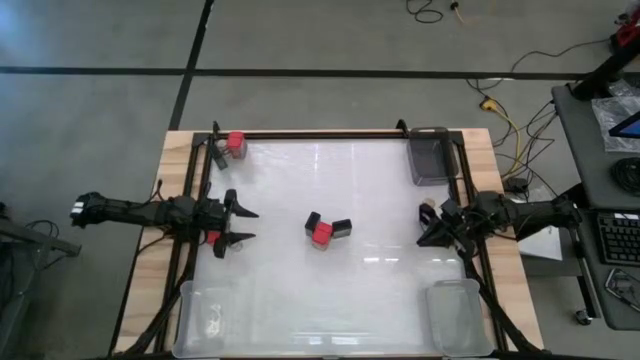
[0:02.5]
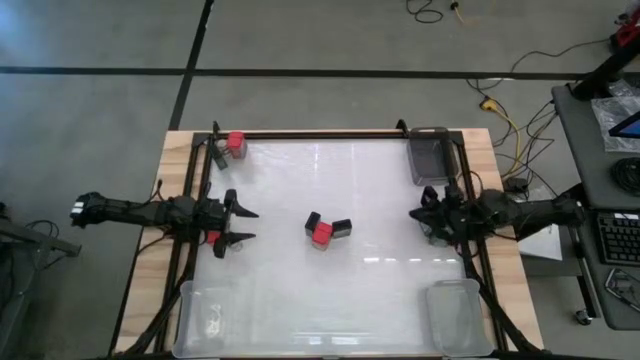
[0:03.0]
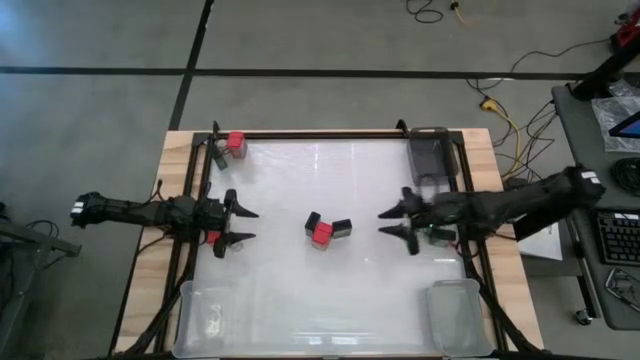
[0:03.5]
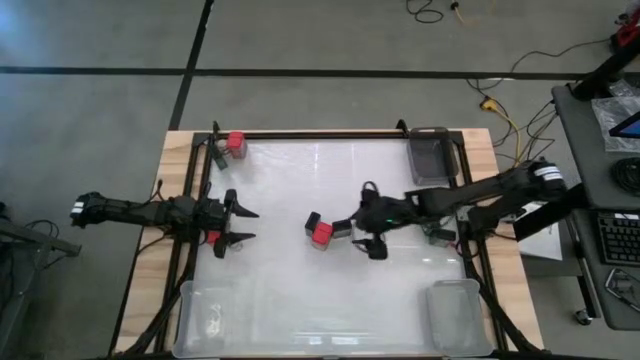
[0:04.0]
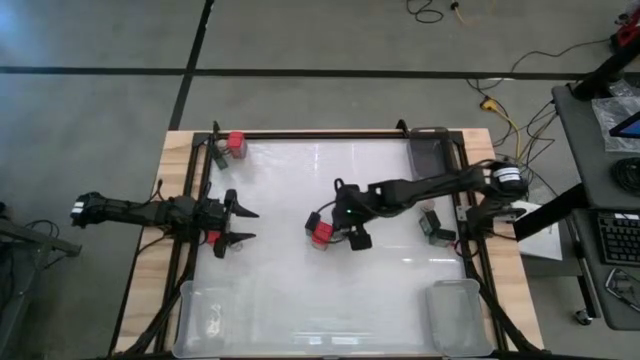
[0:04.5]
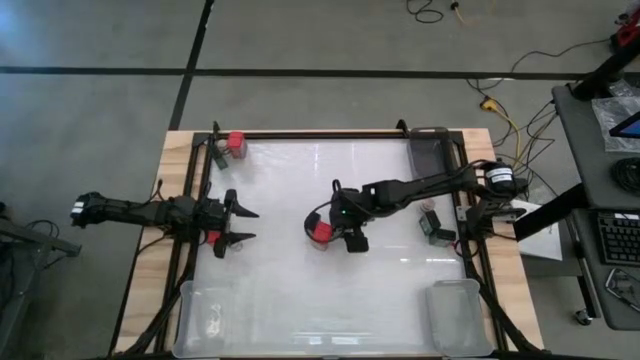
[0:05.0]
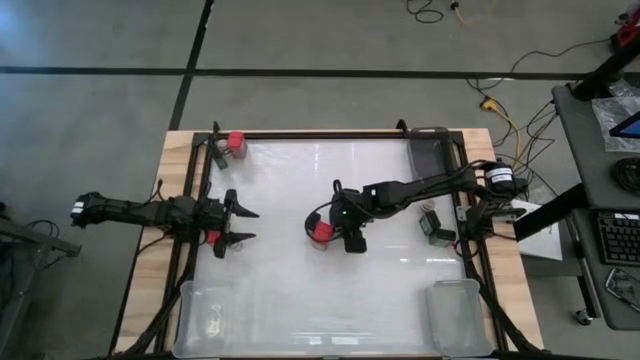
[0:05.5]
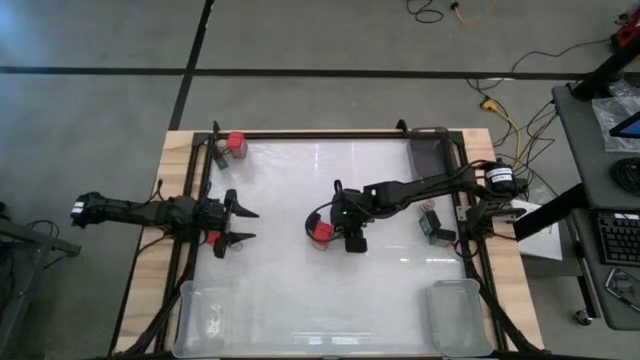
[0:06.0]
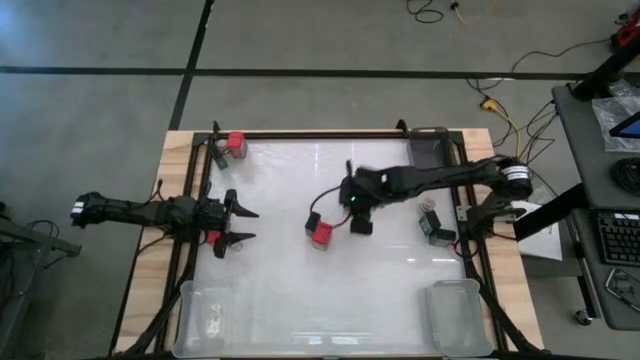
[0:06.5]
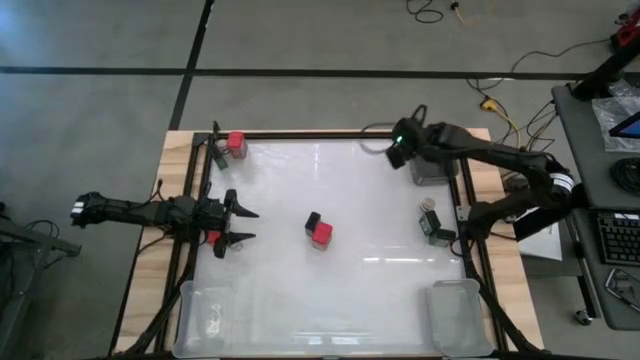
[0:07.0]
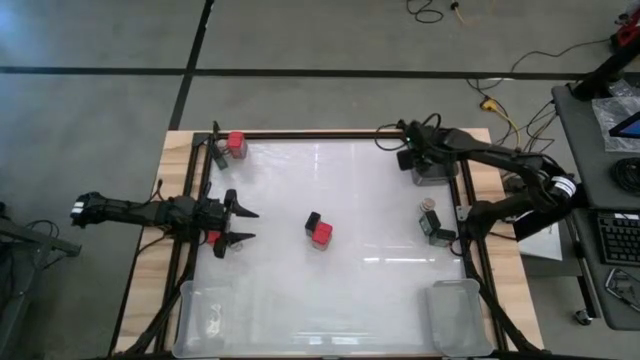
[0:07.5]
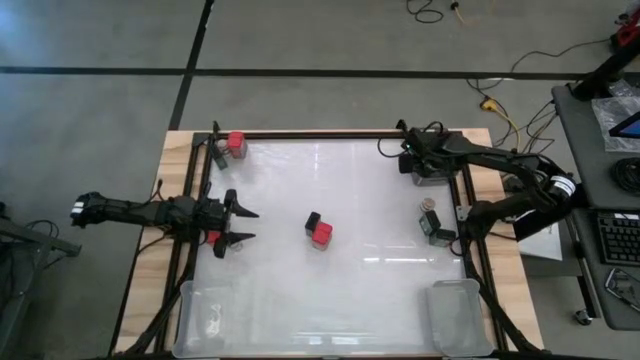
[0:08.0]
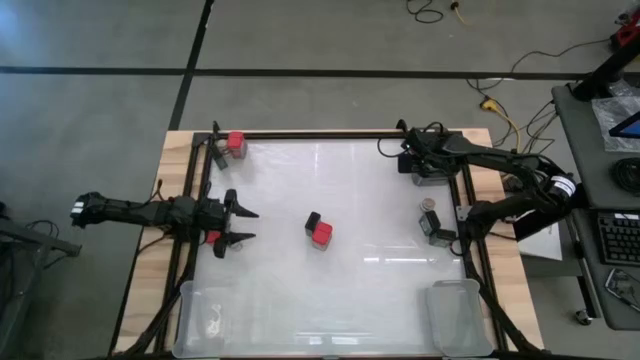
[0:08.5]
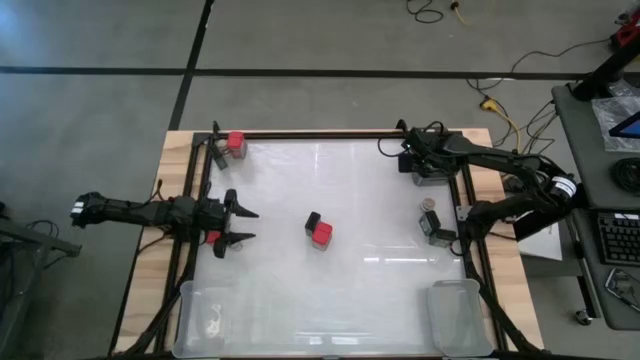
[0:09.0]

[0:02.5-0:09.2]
Task: Sort spices by type
Put the green seasoning can into the black bin

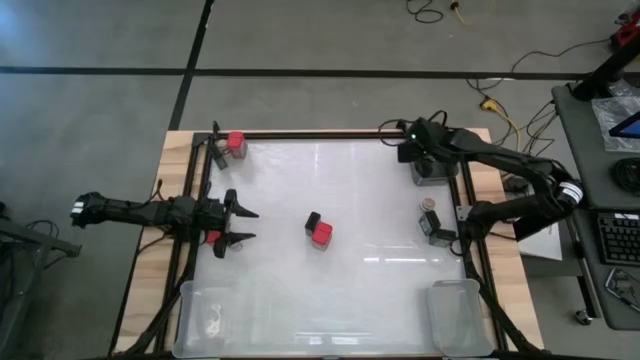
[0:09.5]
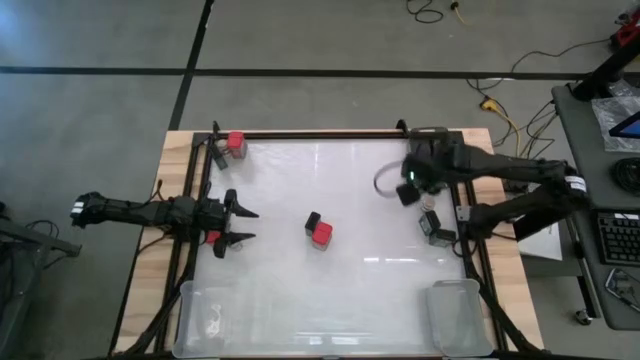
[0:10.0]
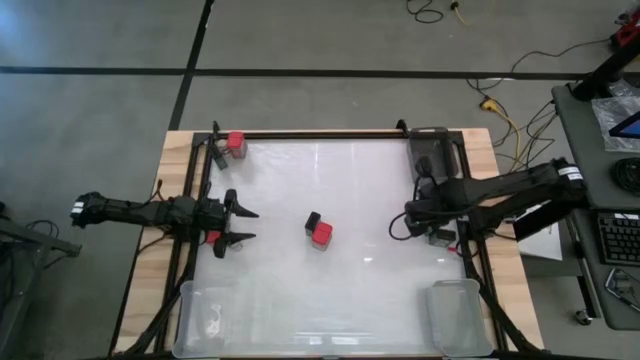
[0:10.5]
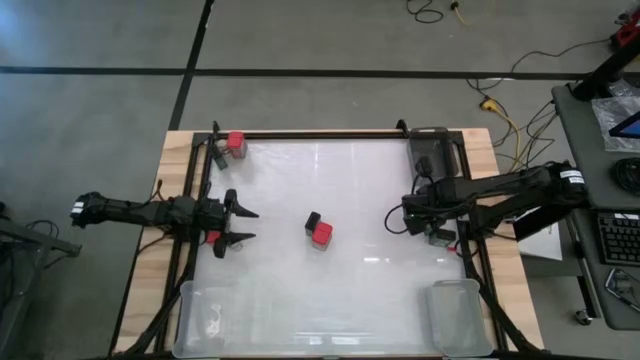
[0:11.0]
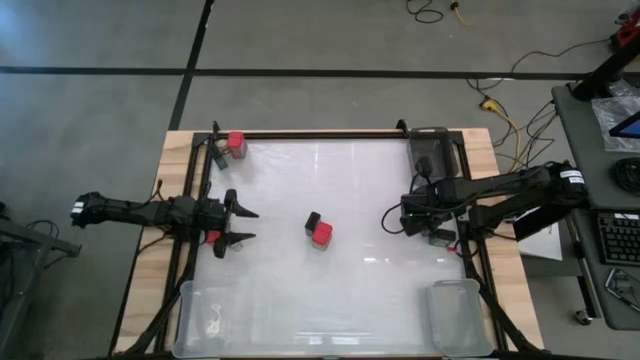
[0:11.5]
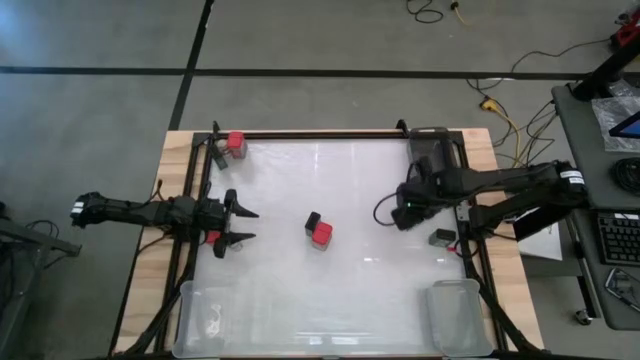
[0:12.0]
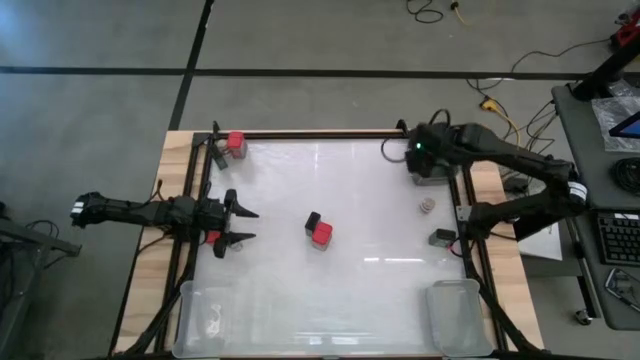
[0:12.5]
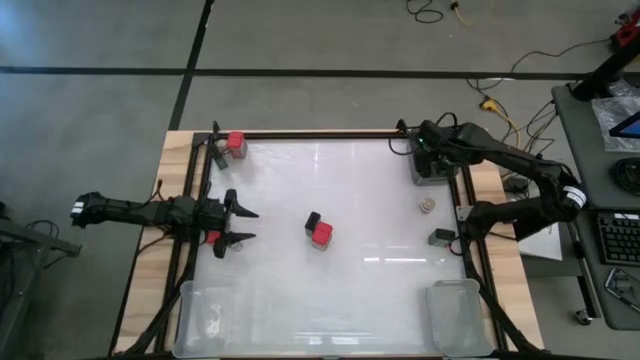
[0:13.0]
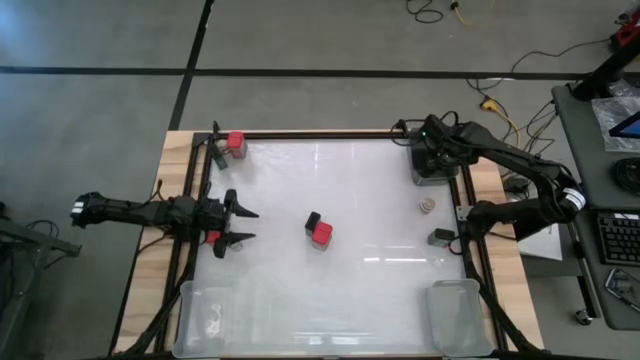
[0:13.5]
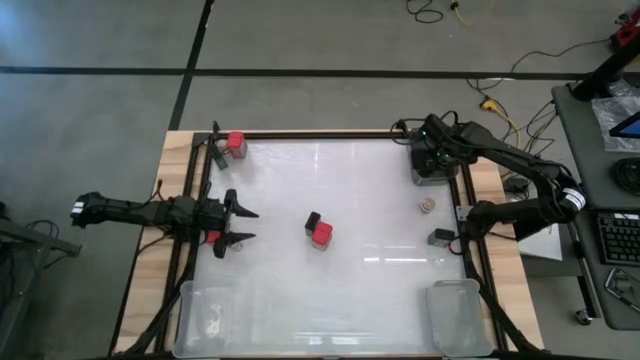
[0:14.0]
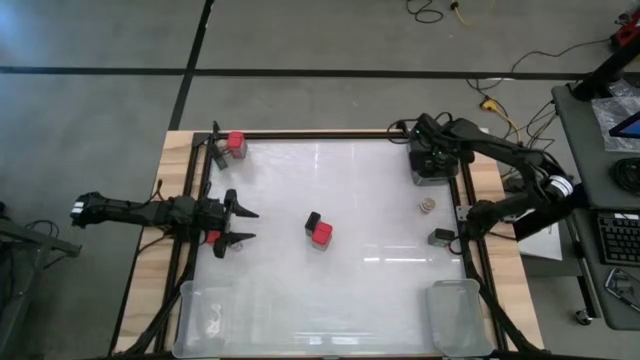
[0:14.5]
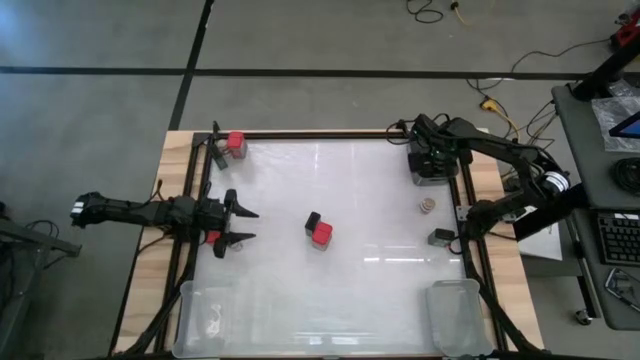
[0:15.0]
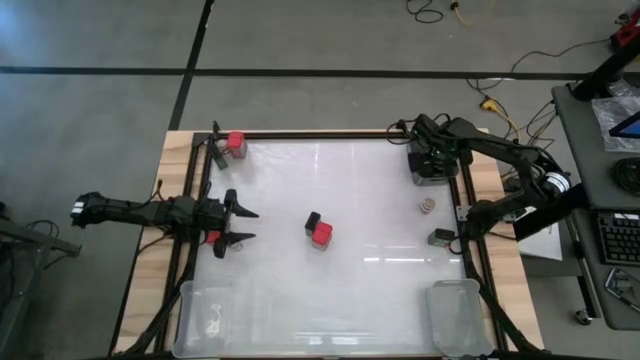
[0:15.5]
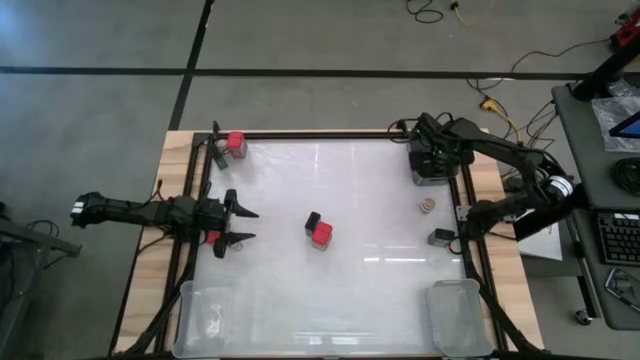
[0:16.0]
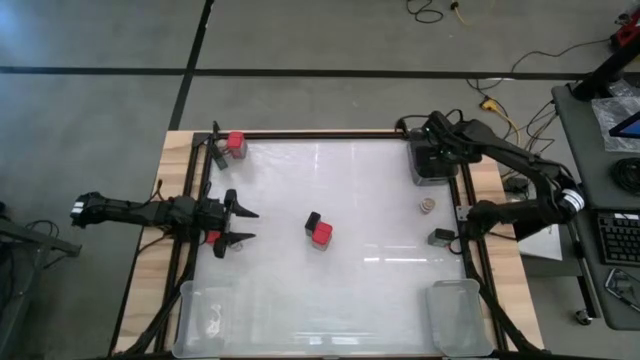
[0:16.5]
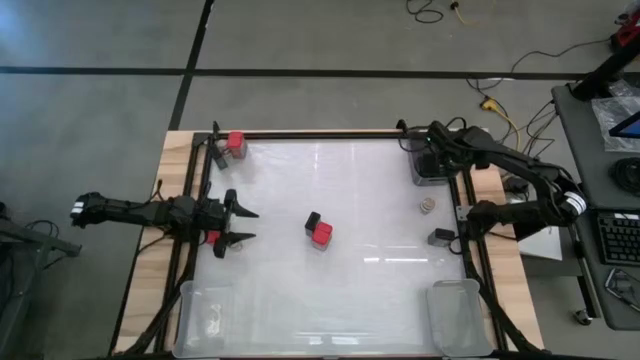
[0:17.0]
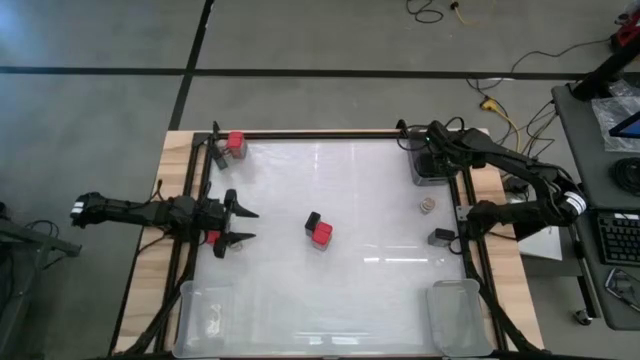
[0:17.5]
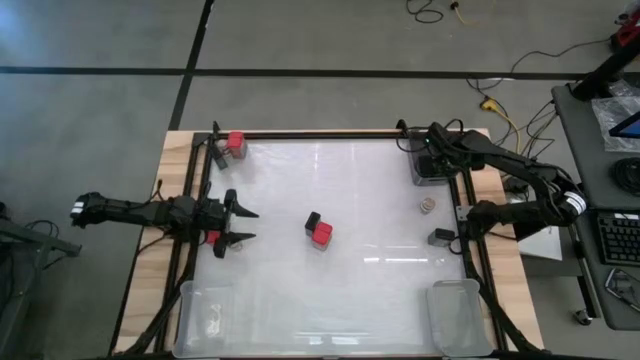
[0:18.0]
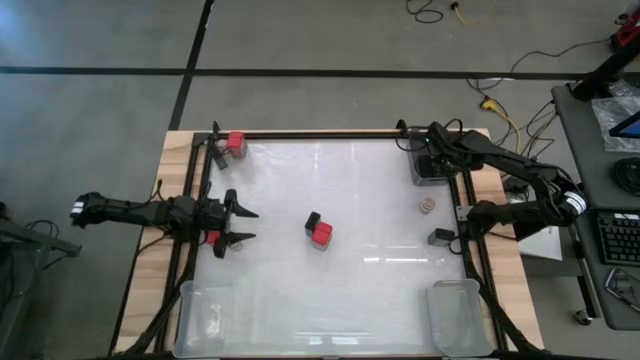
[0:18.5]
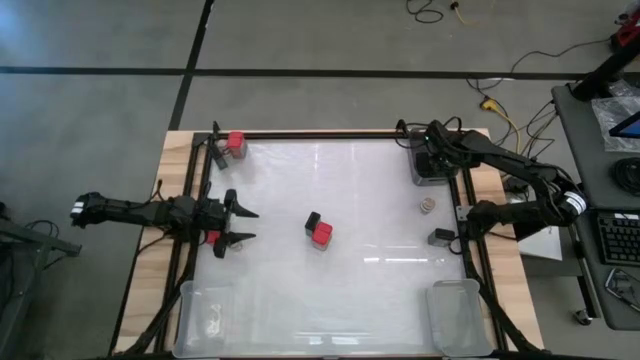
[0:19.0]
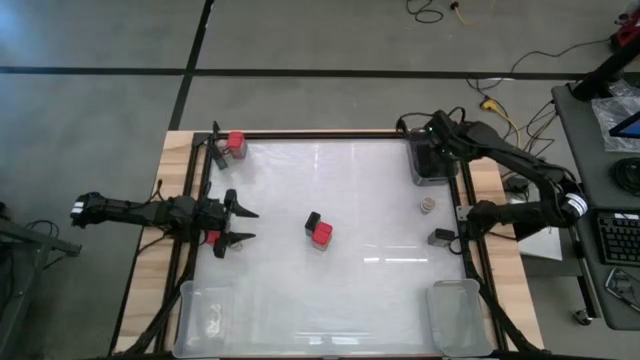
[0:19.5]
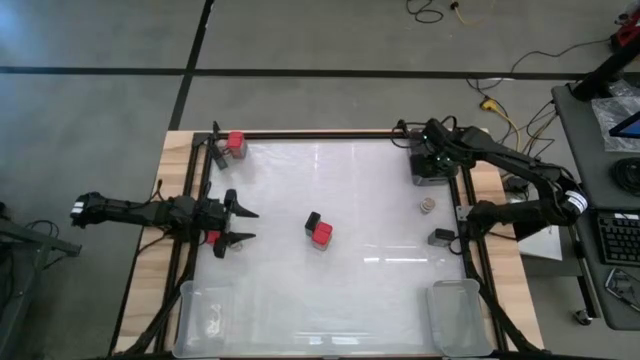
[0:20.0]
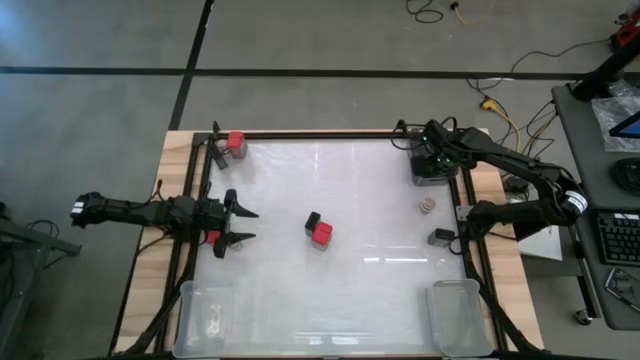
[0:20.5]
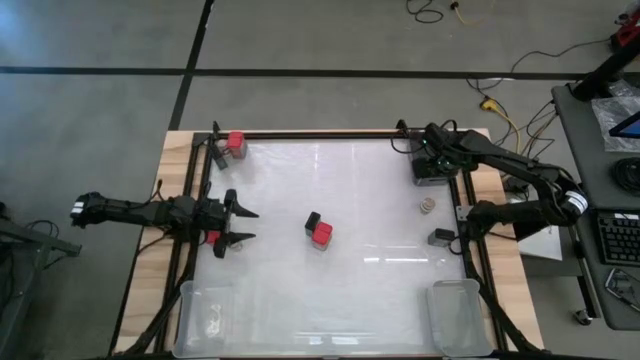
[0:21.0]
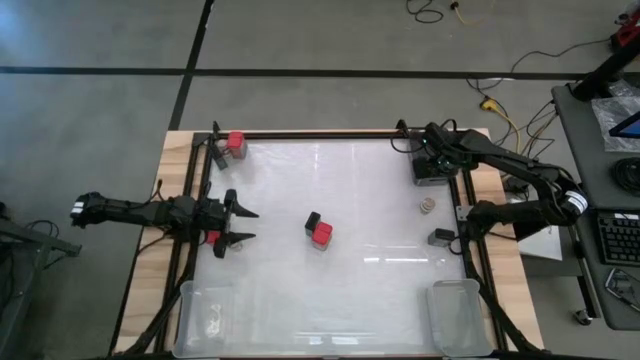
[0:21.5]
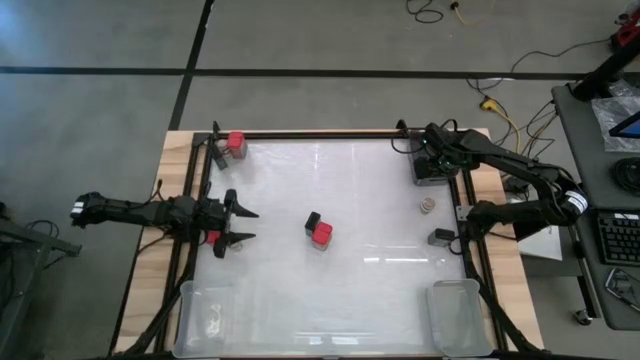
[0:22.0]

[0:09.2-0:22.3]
Put the green seasoning can into the black bin
